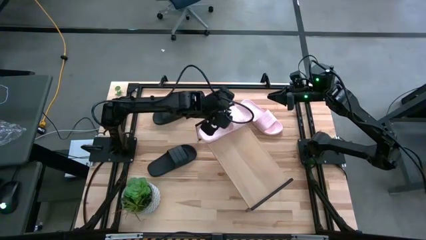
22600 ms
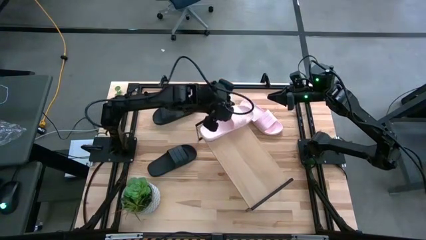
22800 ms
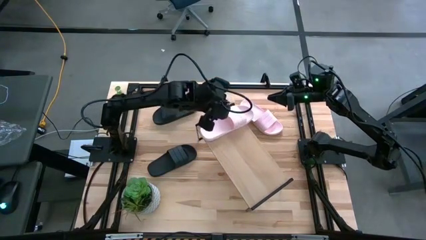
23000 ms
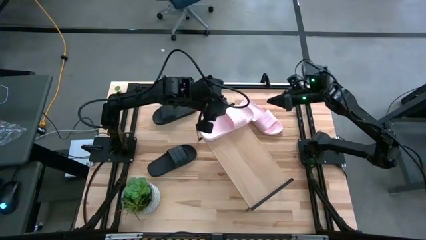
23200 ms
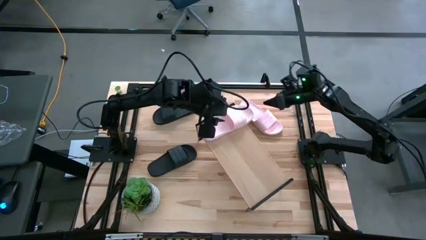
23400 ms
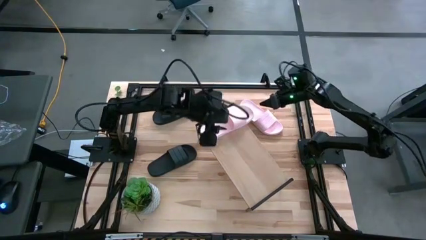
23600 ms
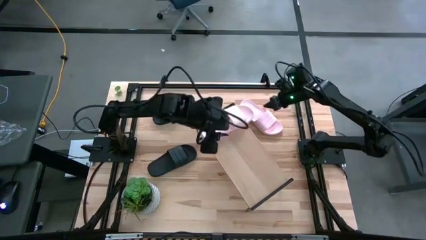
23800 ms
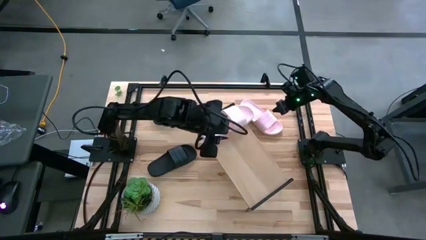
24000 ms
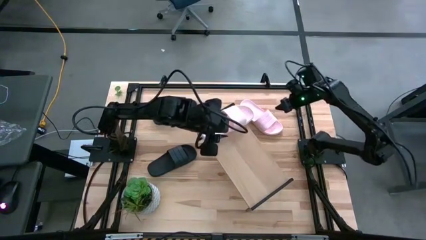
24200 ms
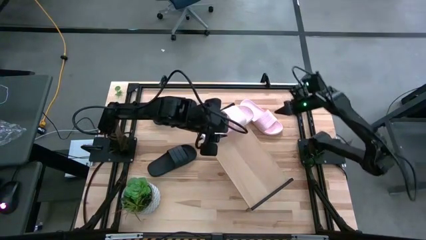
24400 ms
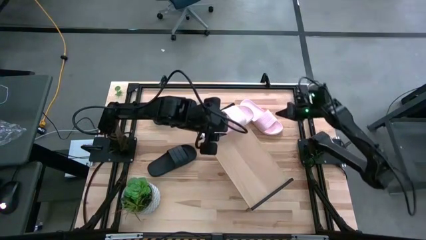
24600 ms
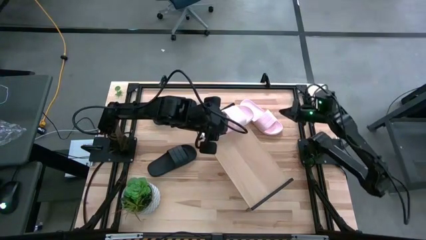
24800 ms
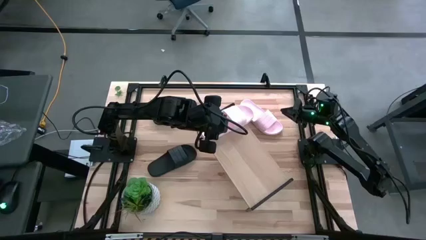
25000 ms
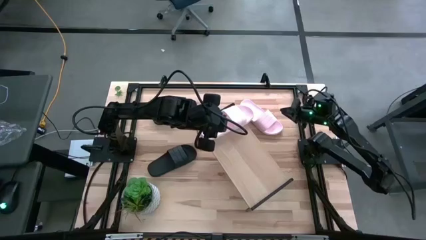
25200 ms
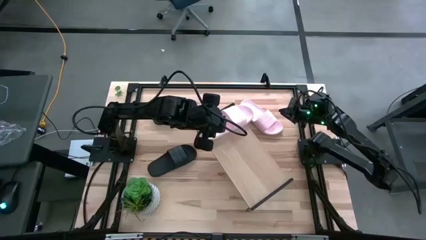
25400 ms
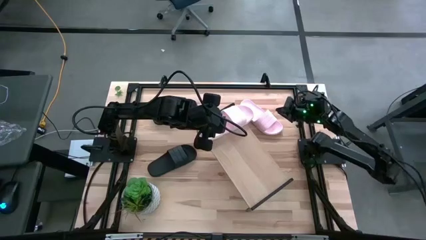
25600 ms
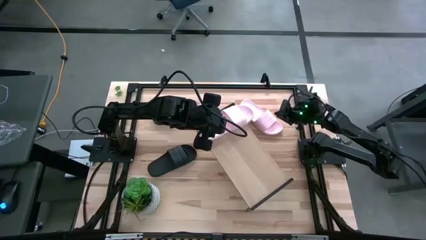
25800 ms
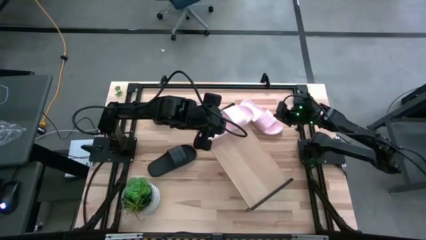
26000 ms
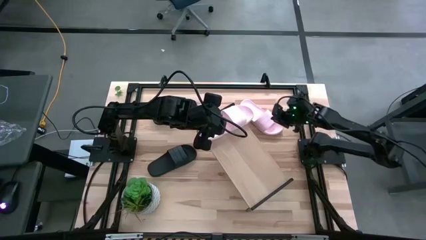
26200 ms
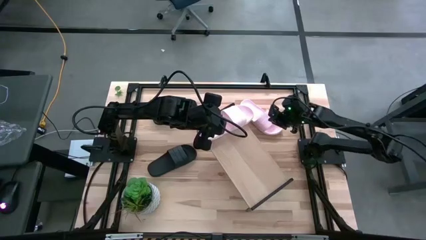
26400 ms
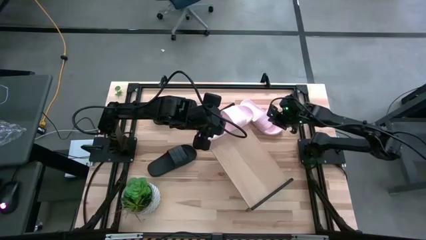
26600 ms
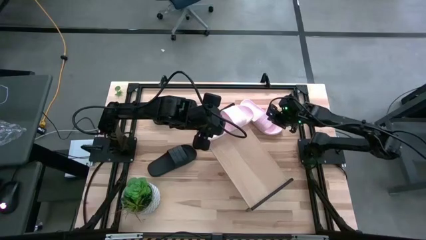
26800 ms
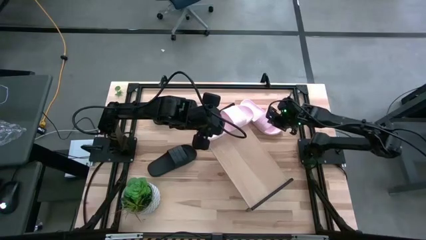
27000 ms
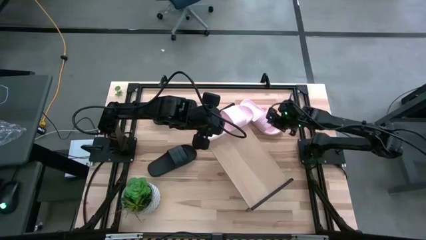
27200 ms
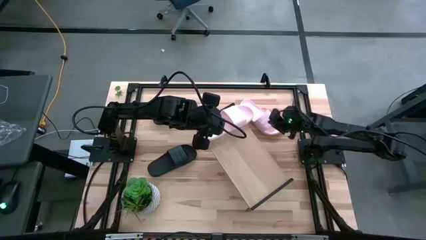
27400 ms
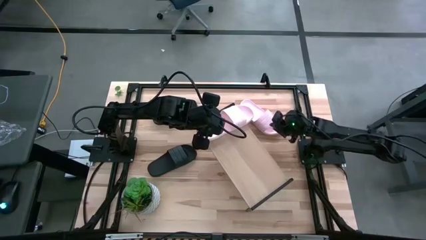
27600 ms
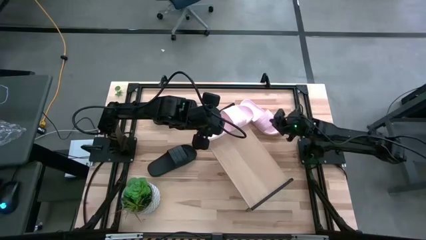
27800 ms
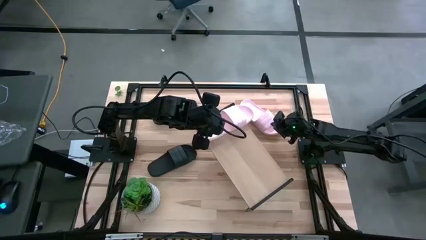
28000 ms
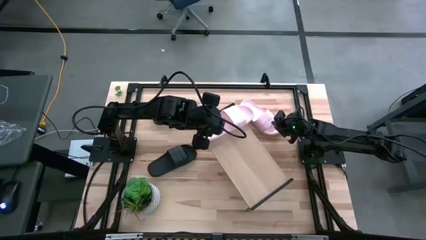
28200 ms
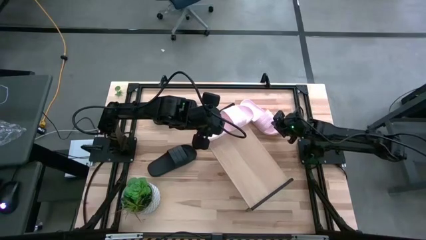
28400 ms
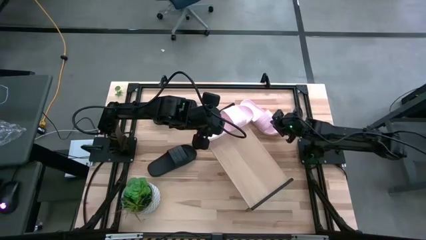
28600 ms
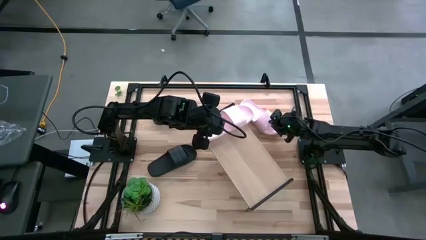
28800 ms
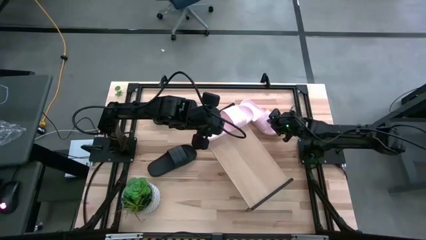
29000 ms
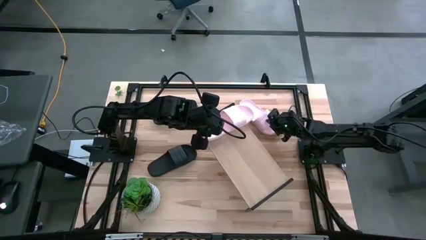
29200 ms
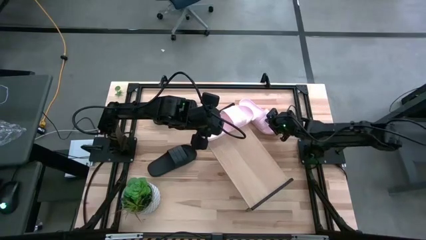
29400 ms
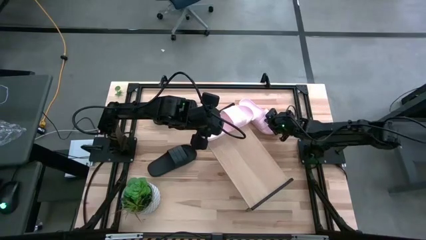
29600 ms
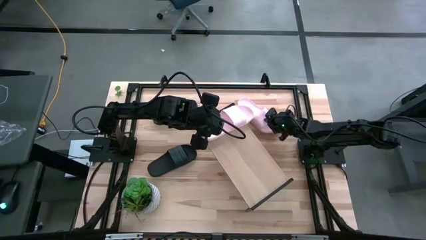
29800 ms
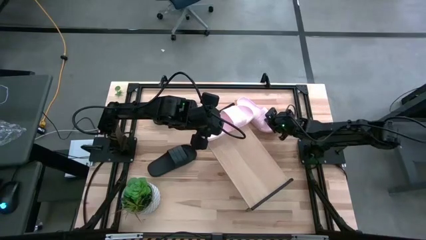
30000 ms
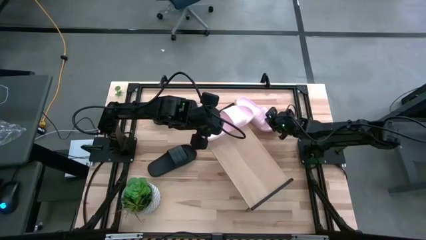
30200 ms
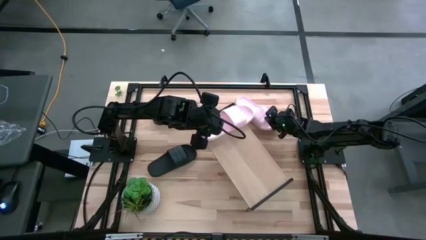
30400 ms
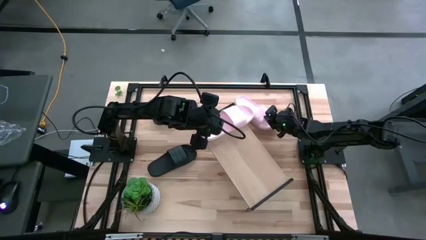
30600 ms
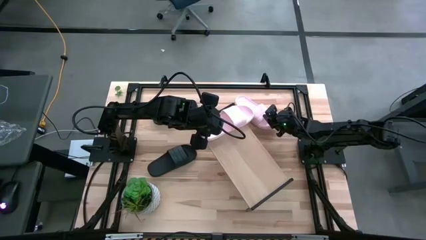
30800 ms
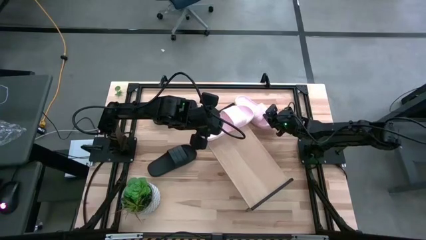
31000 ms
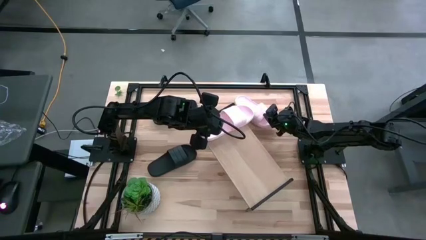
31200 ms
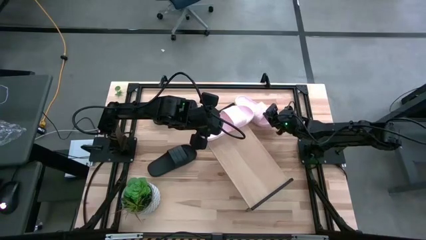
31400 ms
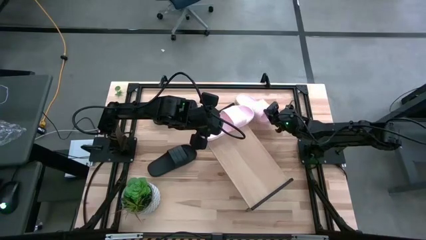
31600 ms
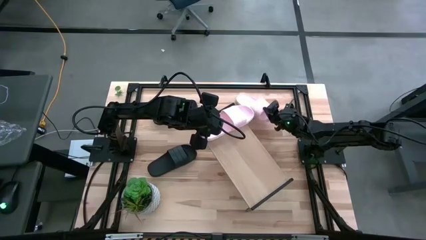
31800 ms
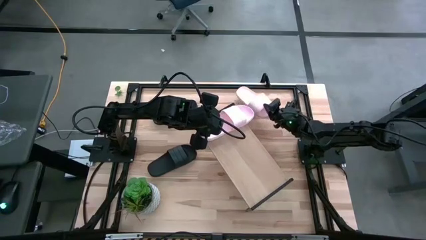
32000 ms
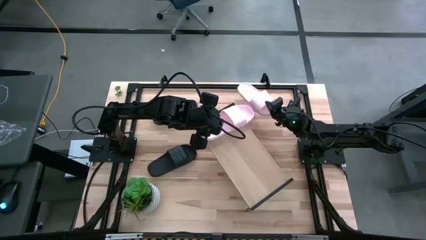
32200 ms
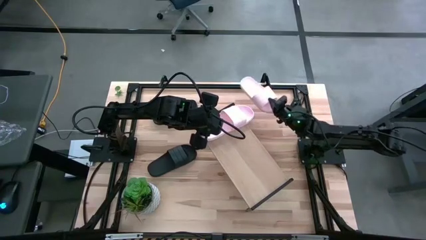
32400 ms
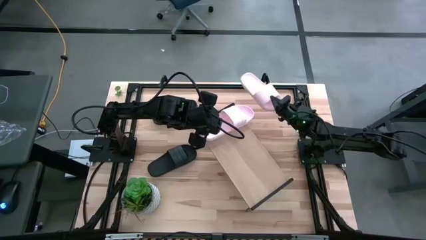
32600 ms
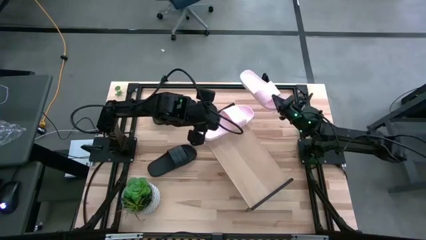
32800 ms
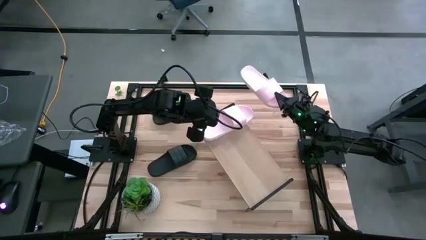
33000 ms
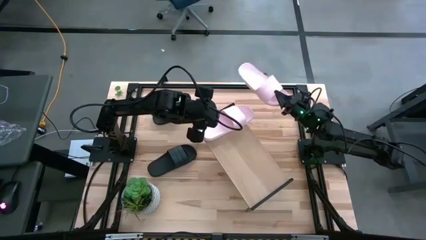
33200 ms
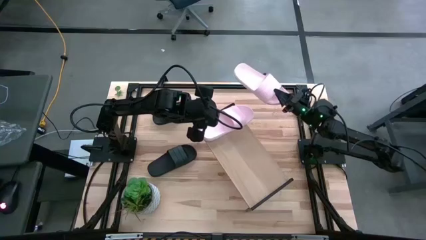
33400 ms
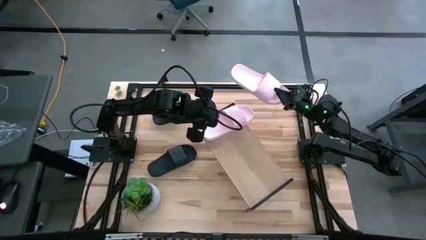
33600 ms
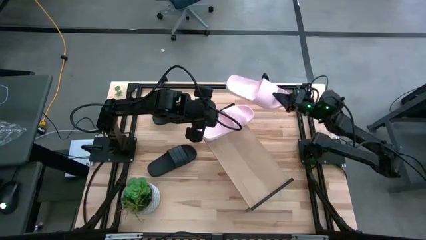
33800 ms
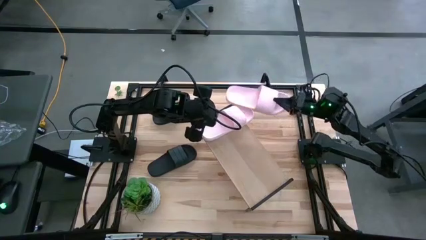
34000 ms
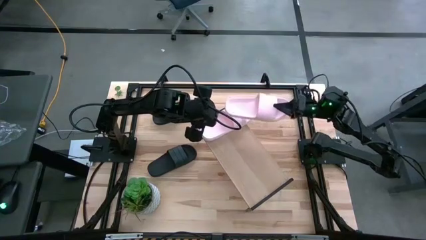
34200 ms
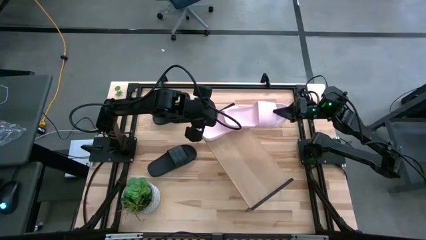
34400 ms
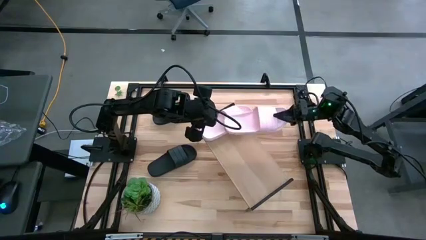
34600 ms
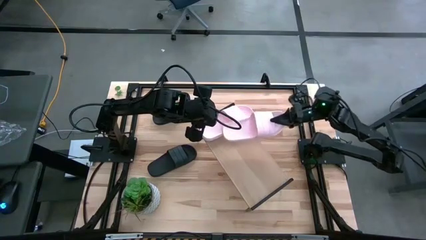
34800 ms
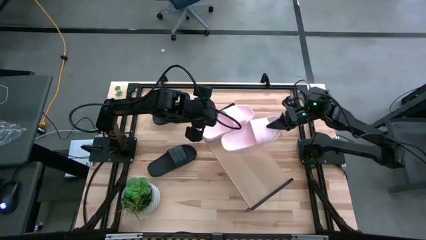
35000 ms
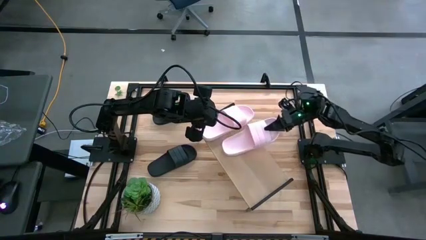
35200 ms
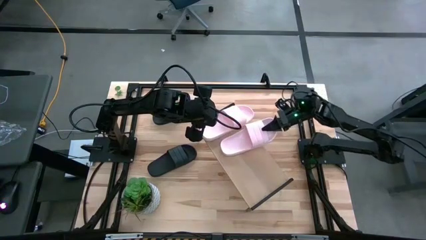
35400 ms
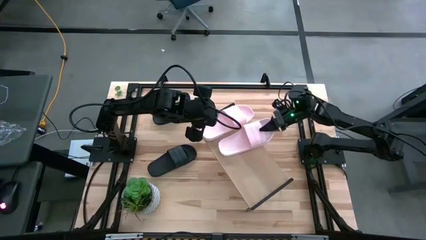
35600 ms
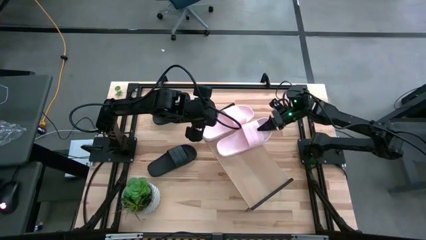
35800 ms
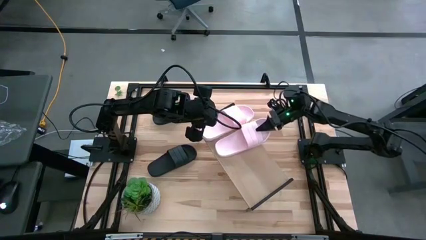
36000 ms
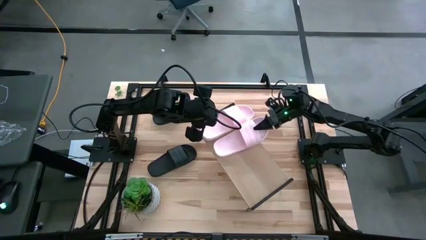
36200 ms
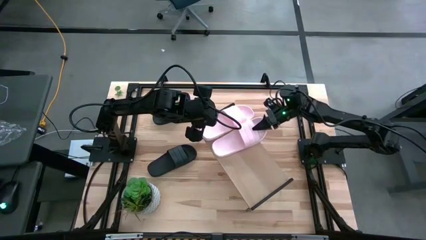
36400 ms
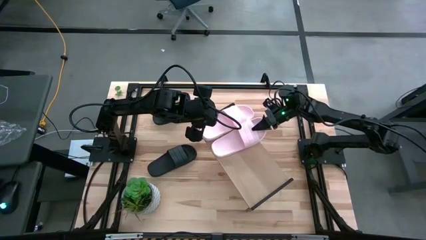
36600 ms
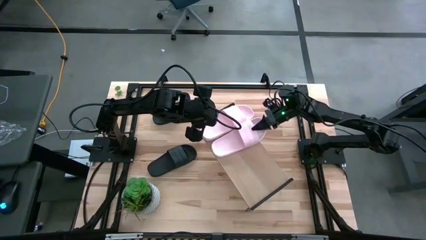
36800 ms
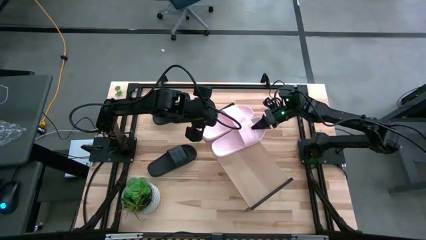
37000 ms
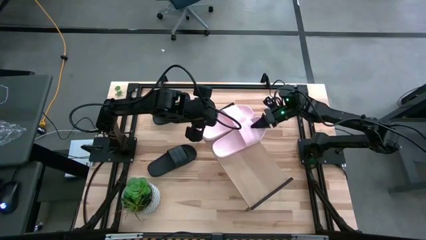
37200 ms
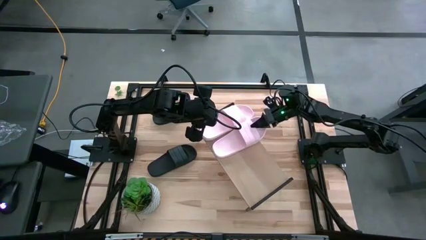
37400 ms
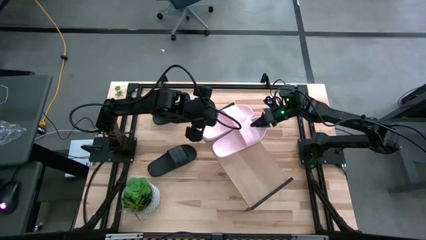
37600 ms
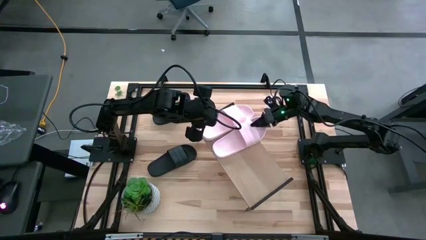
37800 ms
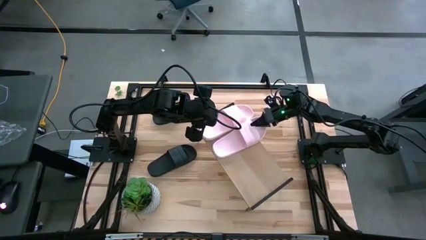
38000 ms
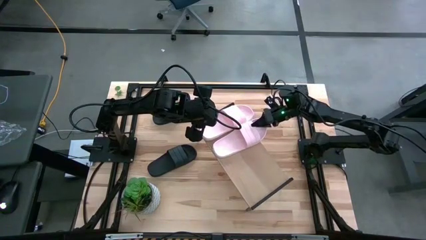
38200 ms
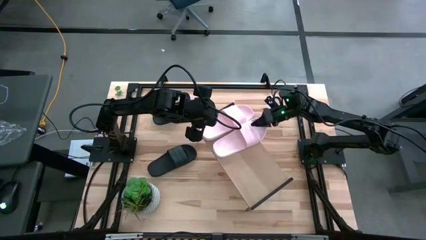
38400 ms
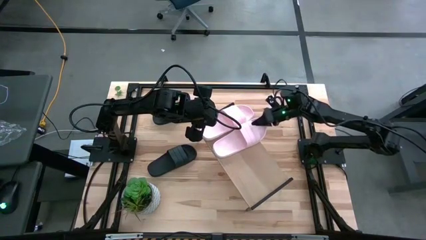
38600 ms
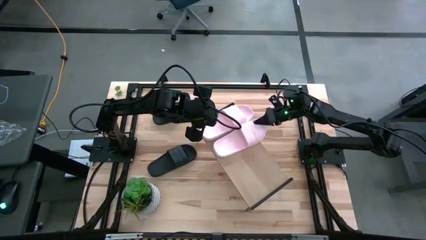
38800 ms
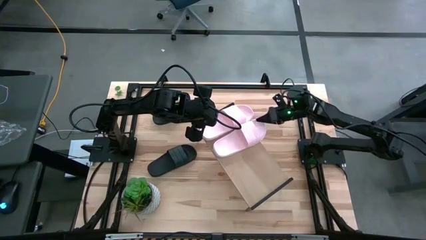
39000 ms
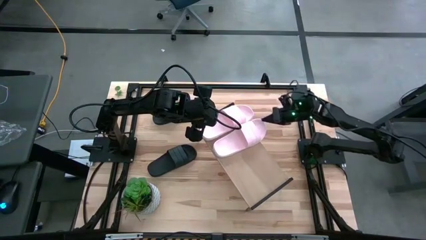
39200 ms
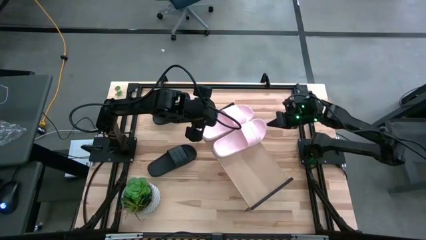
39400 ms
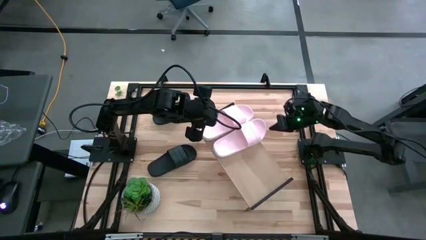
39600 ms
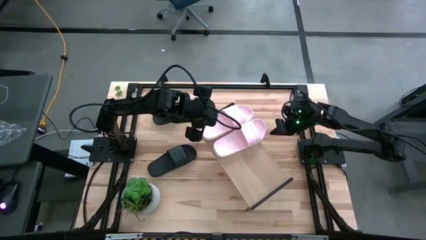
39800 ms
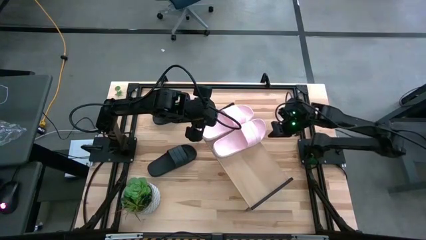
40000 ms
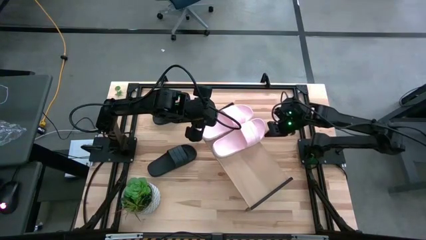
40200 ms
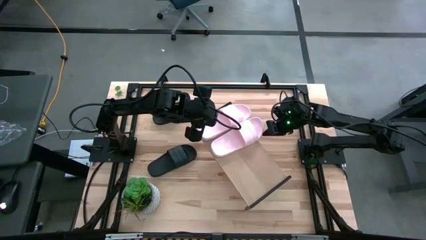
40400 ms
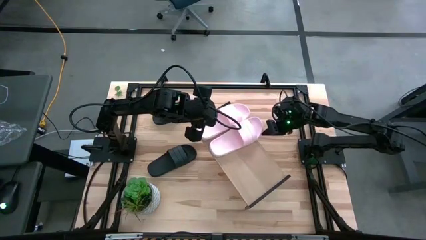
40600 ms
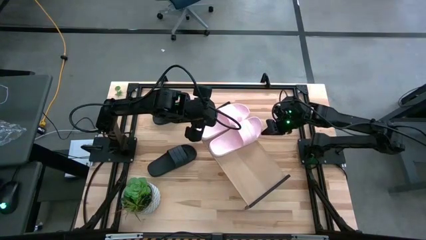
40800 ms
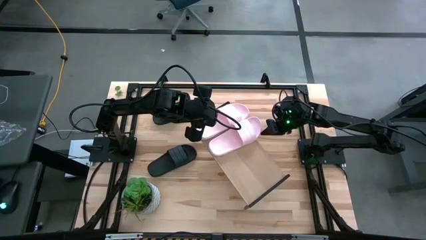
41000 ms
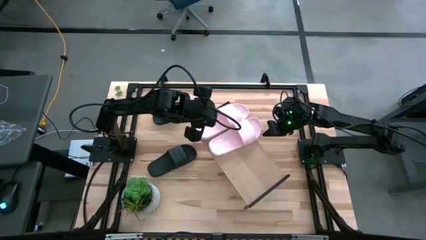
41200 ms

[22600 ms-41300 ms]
Task: Pick and place slides into the shelf
Put the pink slide on the shelf
